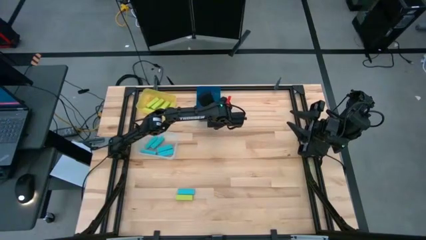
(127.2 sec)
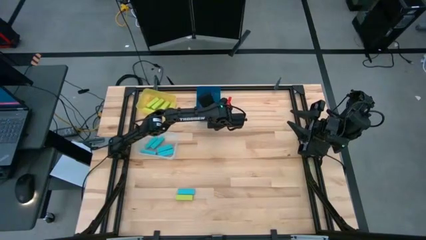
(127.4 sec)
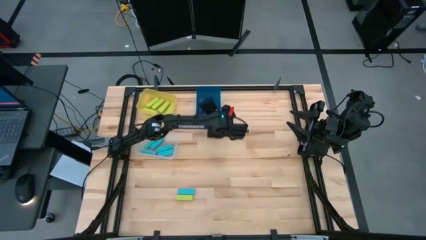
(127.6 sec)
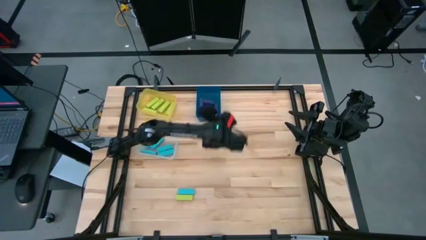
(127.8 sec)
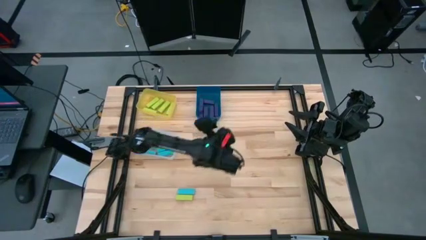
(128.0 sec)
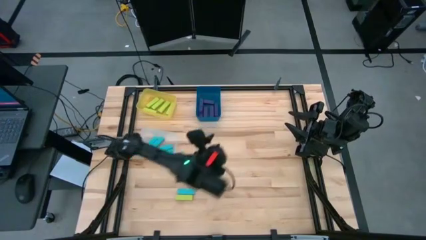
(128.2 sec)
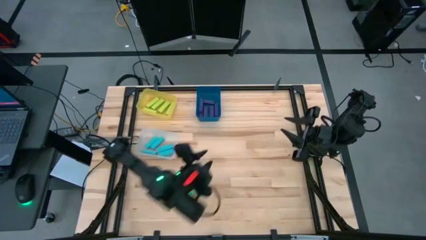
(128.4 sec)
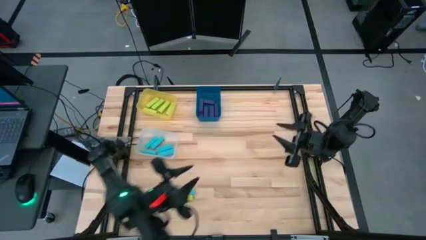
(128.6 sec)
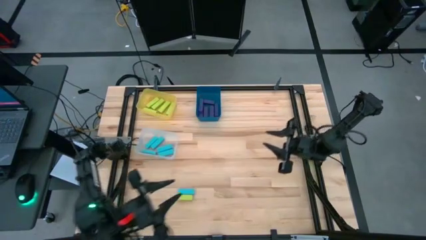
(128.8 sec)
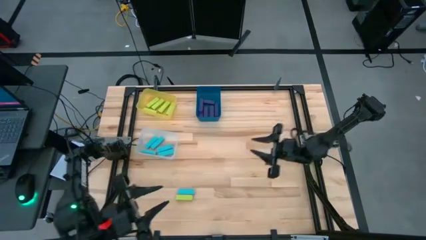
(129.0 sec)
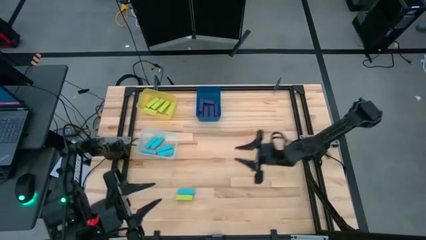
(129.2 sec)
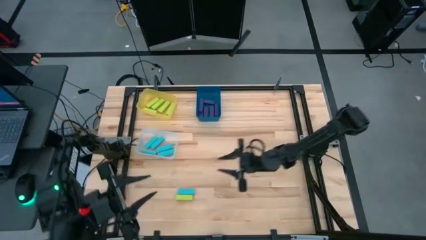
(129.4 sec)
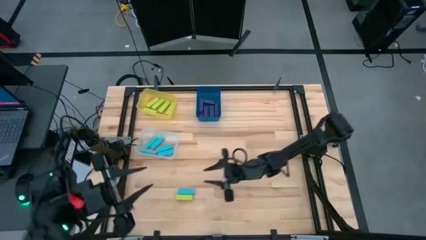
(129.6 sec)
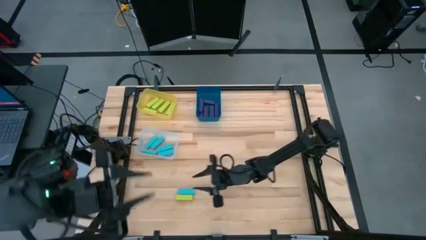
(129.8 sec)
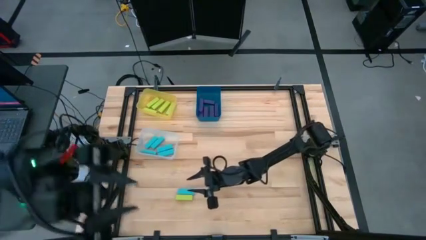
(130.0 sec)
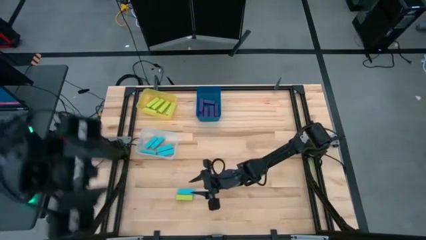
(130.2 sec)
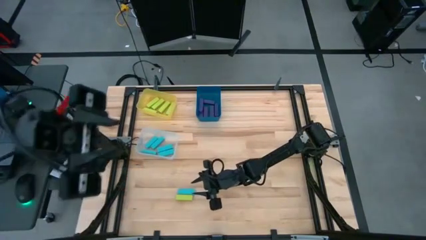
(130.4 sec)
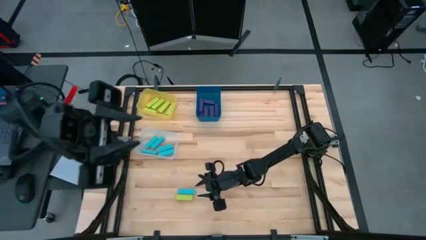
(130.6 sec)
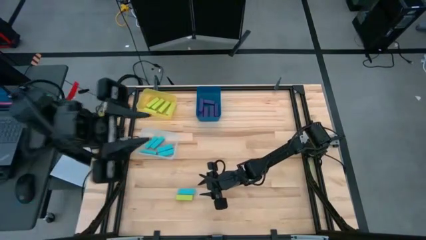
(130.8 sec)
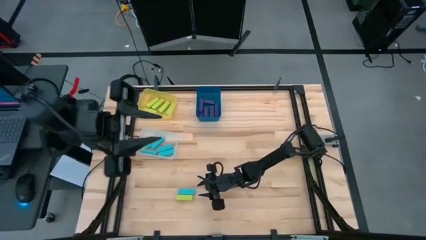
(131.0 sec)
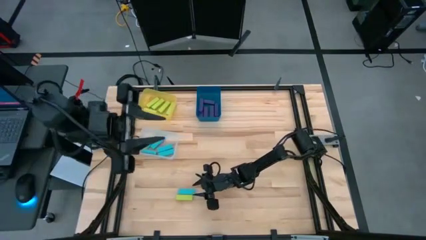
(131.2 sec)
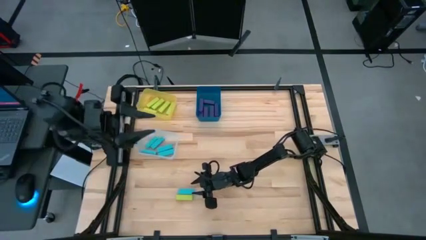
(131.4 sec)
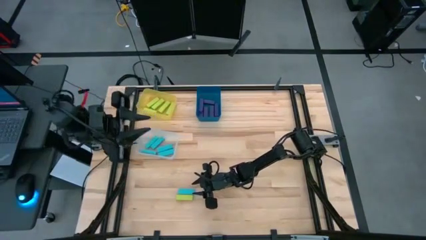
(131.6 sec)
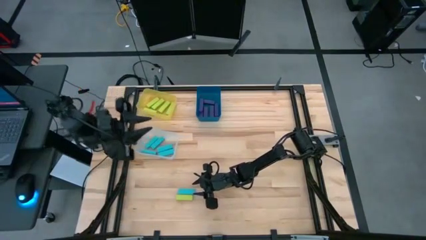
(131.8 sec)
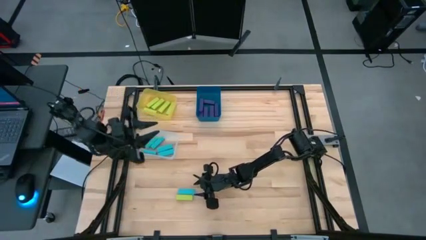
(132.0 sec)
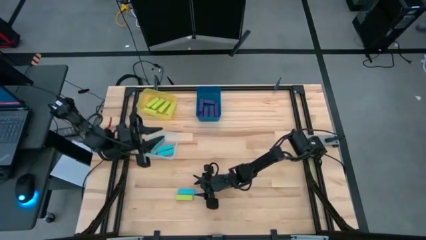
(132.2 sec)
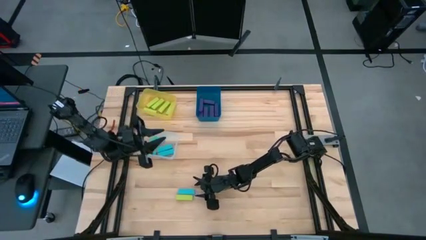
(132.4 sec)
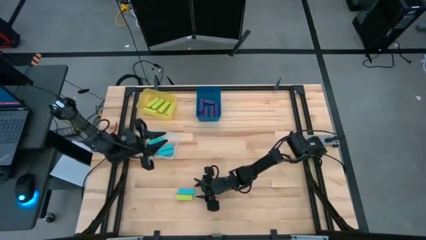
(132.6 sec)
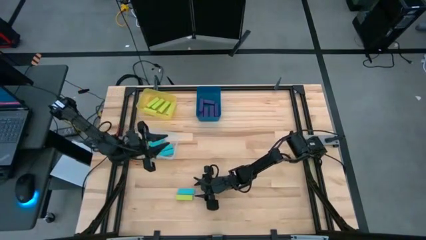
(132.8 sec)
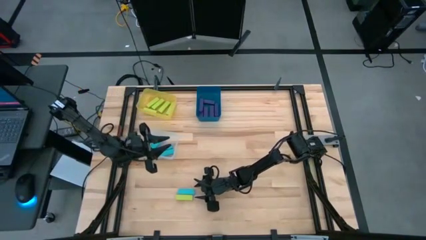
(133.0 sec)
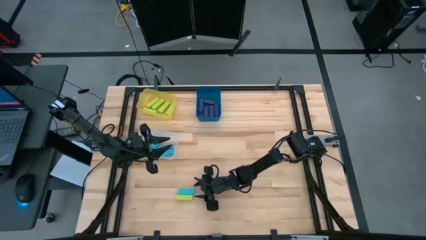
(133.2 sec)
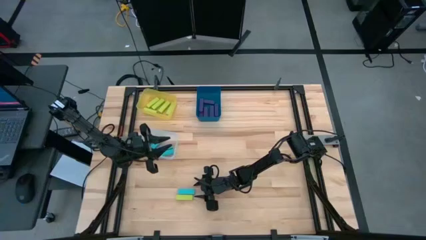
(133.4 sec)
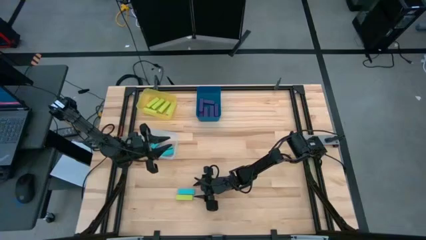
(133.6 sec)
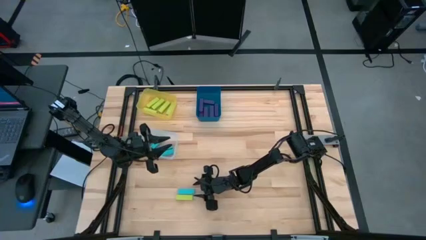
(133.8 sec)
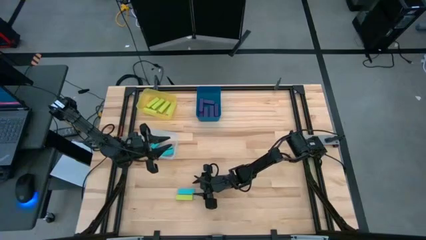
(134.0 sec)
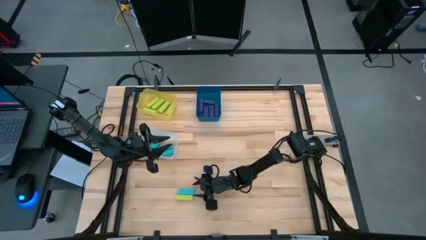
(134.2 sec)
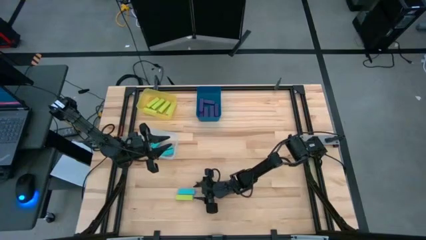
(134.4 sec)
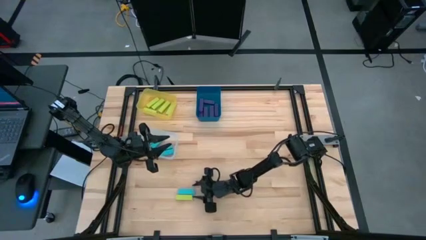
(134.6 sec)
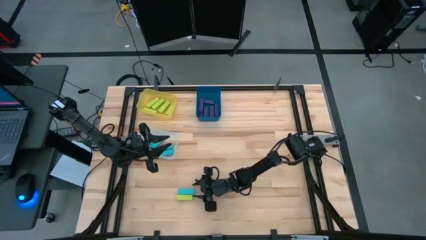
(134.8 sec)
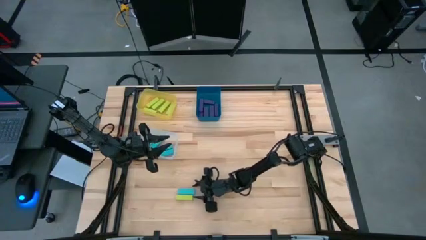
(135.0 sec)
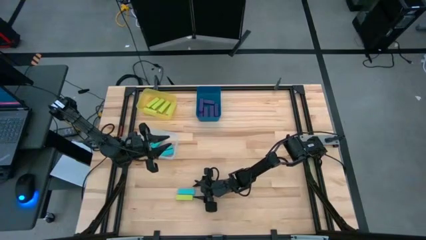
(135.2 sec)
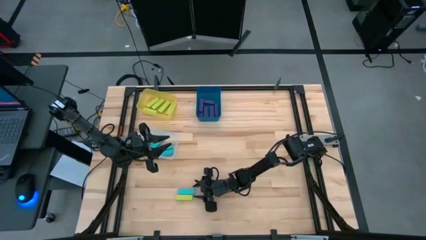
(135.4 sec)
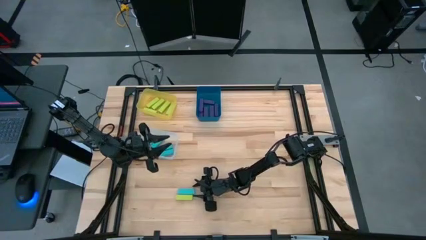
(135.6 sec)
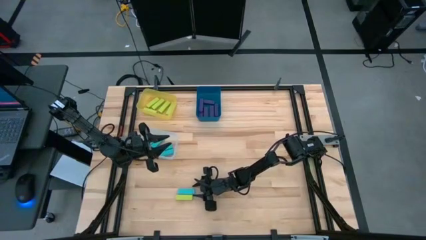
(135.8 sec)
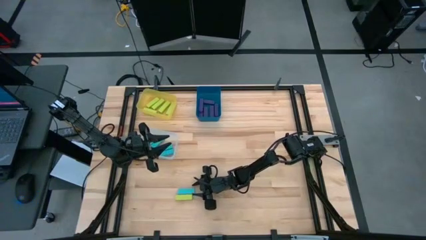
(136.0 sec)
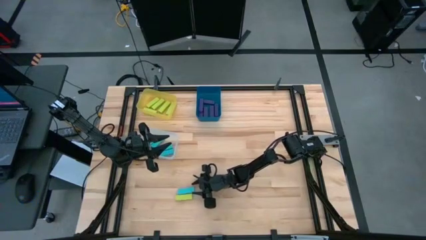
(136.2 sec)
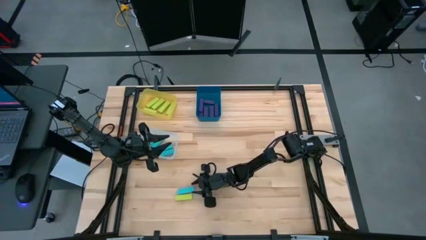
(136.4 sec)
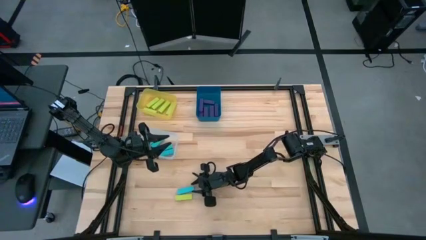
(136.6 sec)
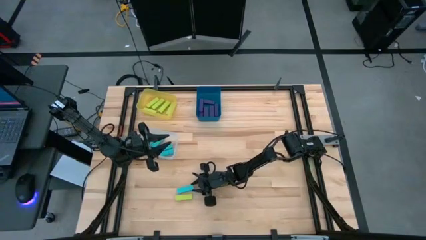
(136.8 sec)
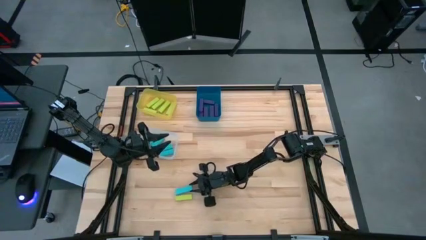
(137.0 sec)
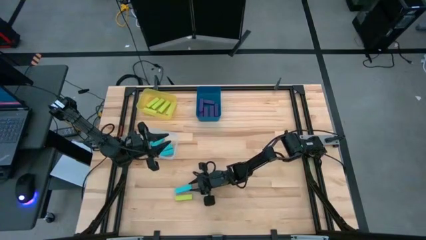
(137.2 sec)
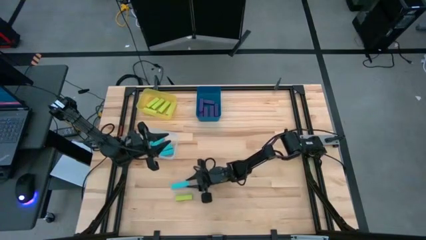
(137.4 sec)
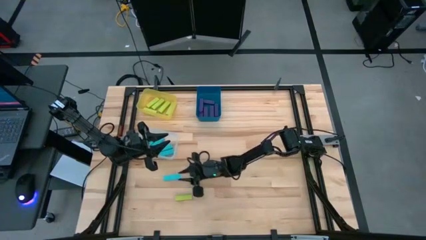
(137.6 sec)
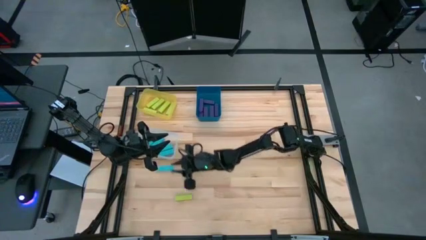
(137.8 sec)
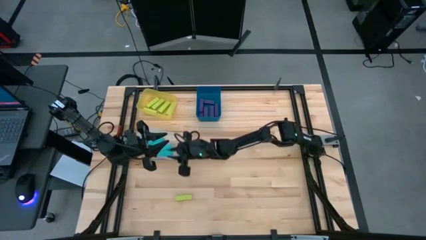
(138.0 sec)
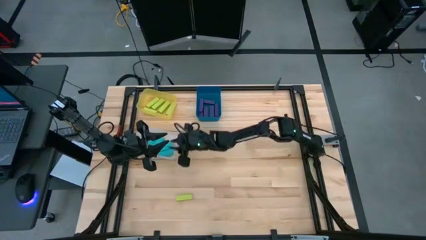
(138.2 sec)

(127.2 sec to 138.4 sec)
Task: Sort blocks
Put the blue block into the white bin

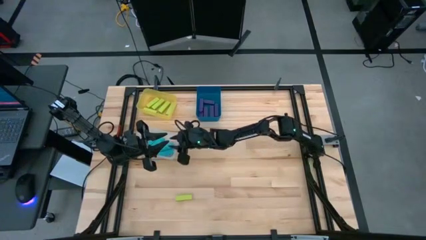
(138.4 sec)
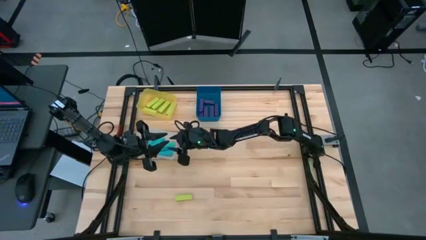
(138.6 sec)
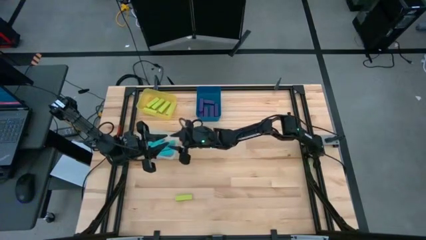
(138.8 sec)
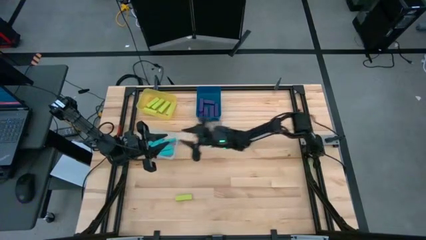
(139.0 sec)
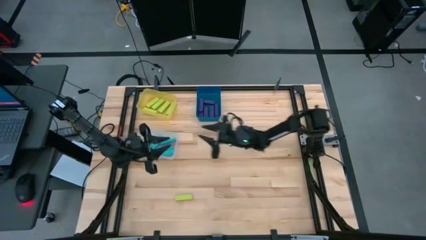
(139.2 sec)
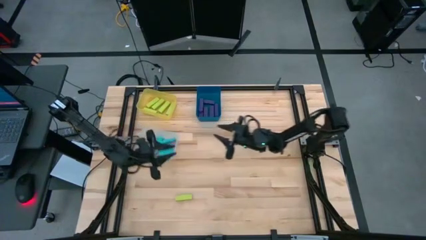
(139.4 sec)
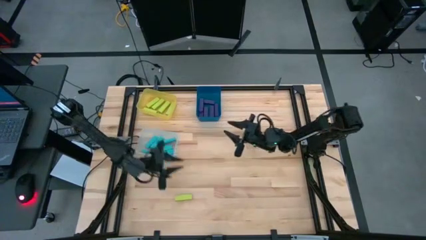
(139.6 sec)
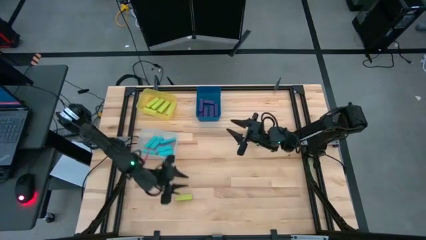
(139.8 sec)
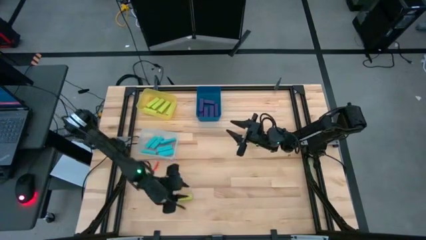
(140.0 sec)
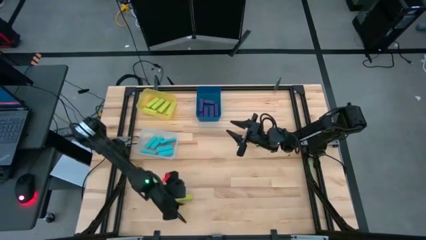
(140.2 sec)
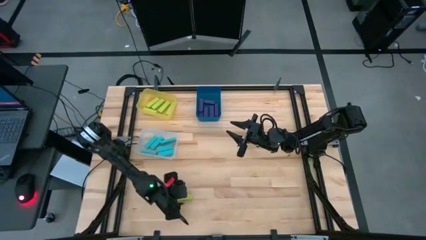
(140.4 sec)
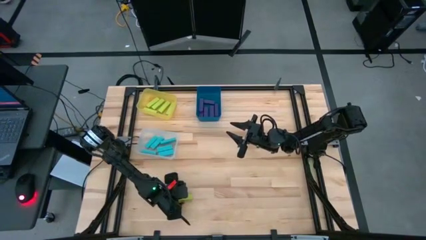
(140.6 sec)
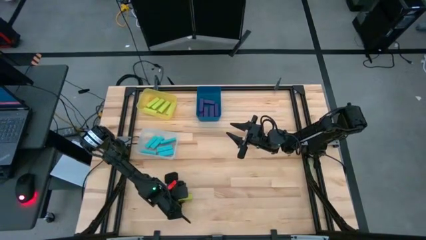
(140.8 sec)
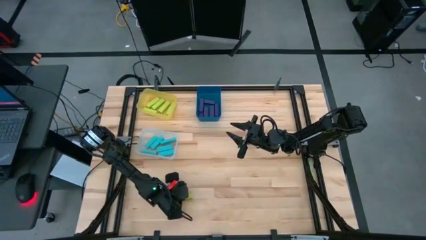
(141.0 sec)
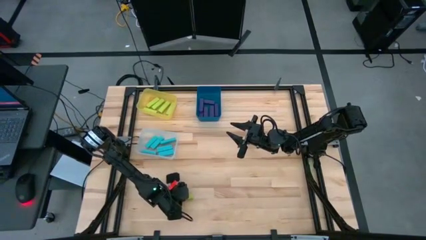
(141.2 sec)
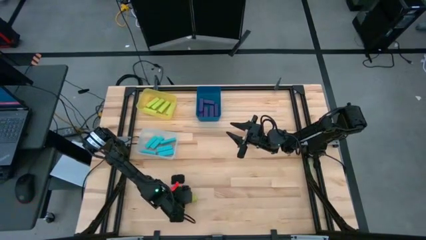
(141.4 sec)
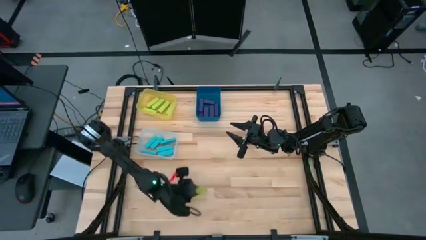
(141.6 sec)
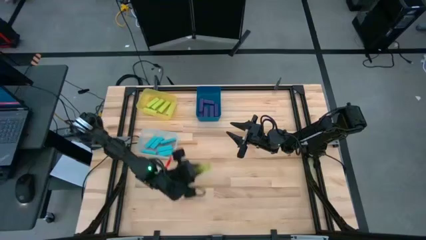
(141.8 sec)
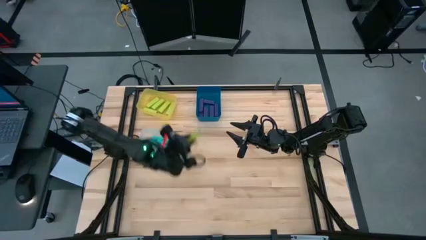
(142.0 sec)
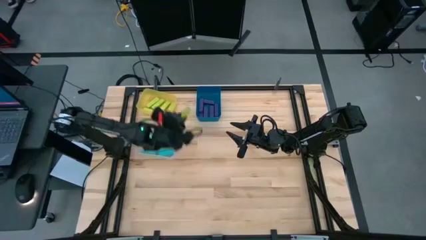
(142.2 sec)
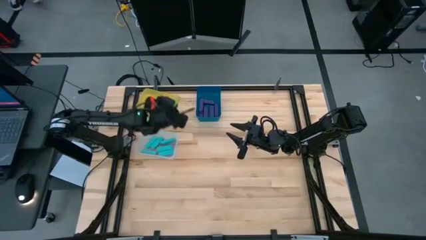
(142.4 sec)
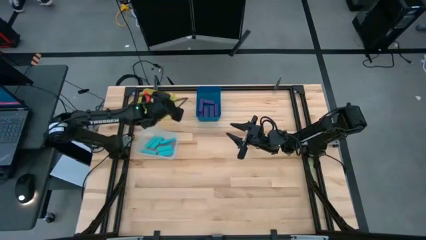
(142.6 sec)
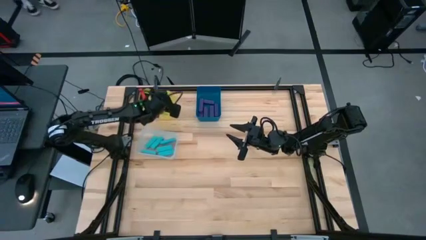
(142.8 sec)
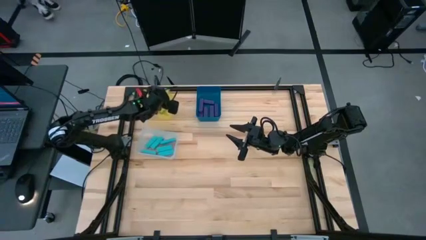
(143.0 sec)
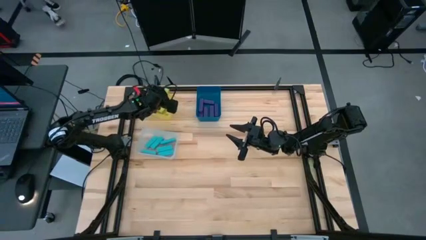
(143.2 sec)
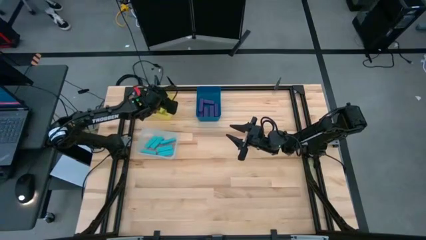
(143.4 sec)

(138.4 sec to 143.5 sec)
Put the green block into the yellow bin
